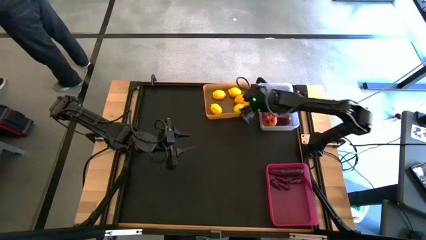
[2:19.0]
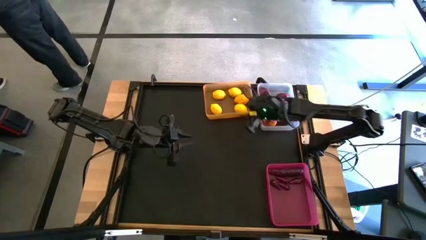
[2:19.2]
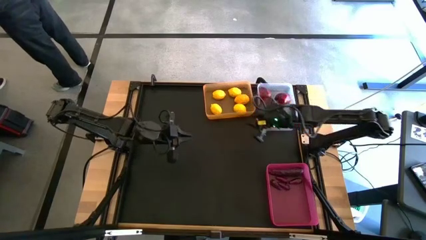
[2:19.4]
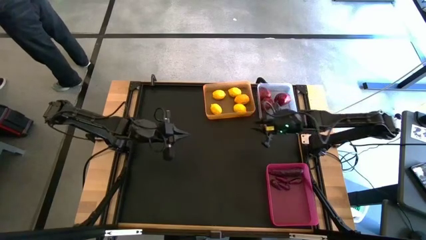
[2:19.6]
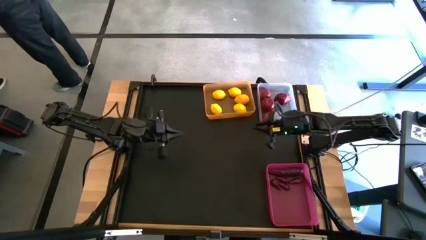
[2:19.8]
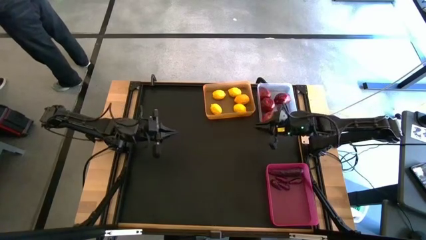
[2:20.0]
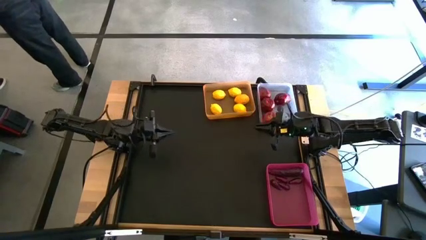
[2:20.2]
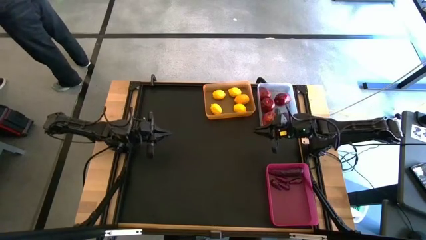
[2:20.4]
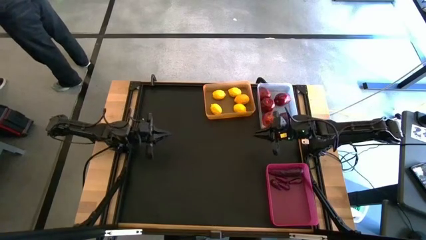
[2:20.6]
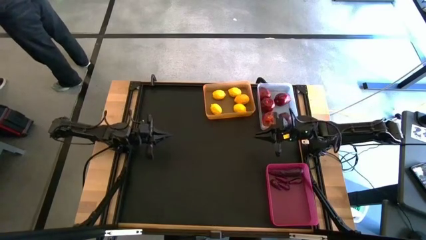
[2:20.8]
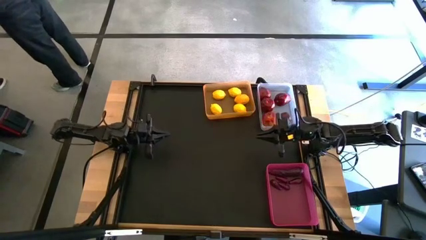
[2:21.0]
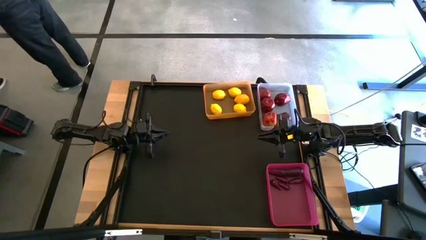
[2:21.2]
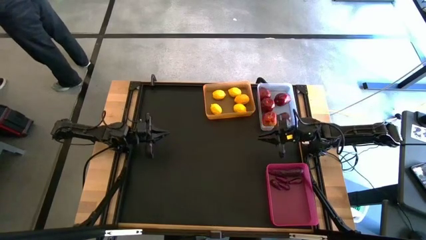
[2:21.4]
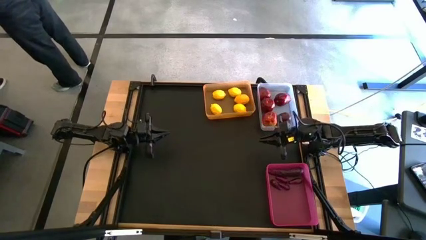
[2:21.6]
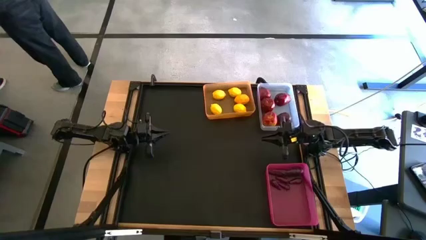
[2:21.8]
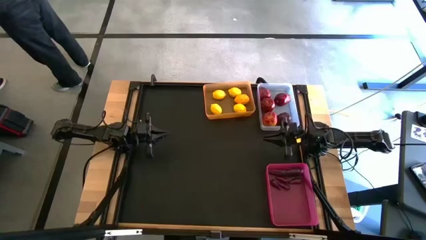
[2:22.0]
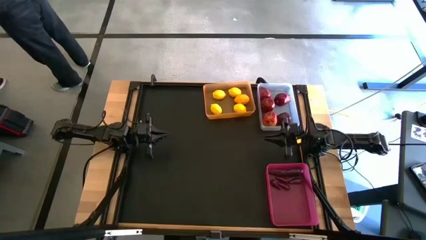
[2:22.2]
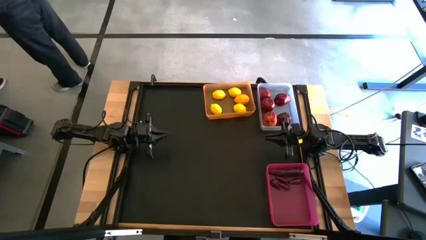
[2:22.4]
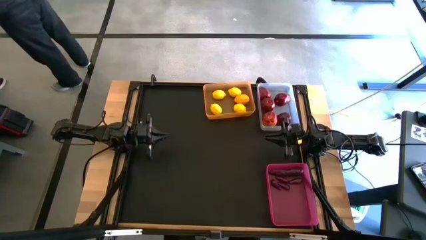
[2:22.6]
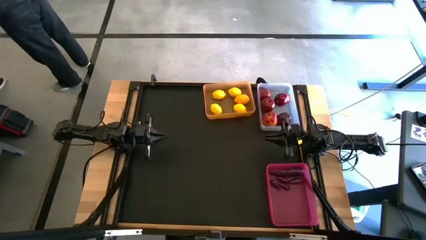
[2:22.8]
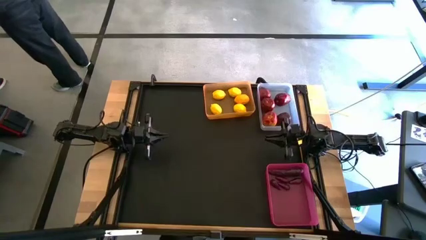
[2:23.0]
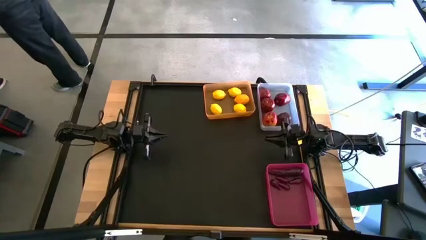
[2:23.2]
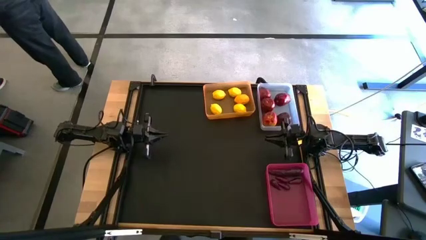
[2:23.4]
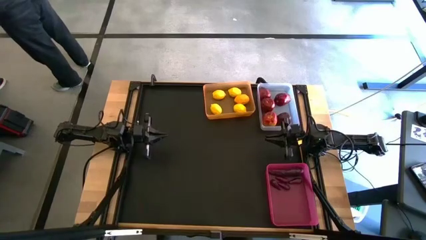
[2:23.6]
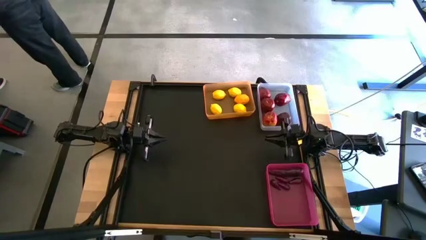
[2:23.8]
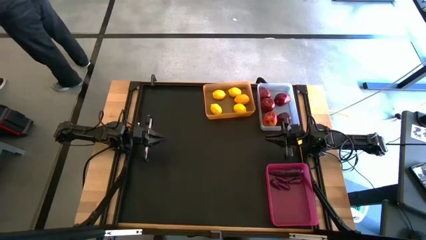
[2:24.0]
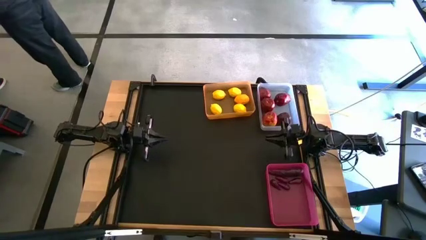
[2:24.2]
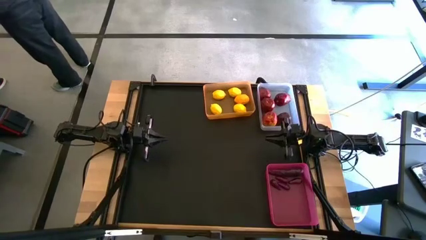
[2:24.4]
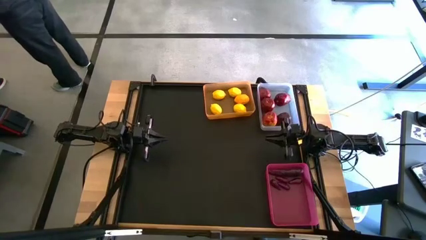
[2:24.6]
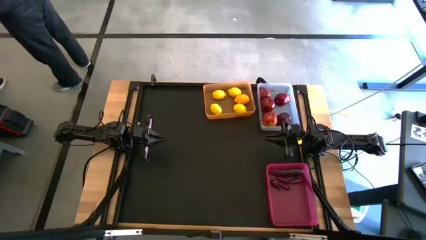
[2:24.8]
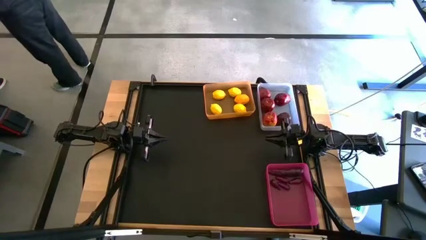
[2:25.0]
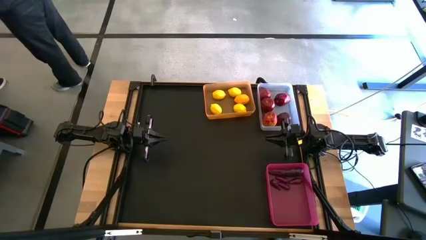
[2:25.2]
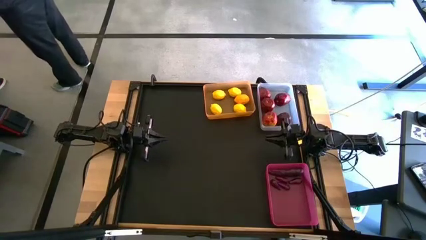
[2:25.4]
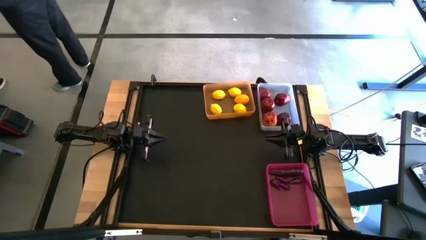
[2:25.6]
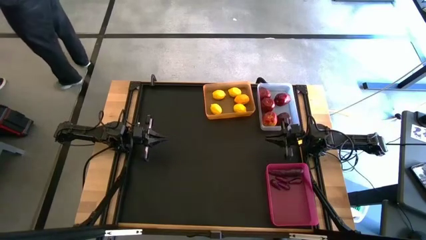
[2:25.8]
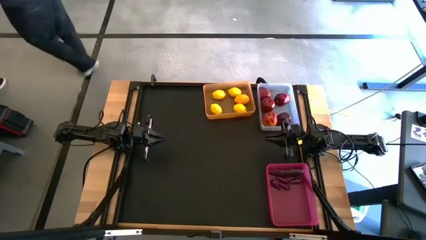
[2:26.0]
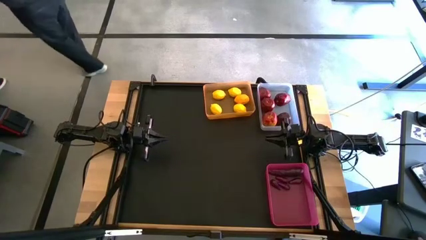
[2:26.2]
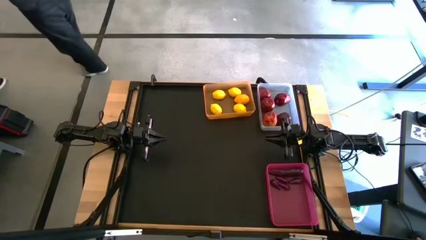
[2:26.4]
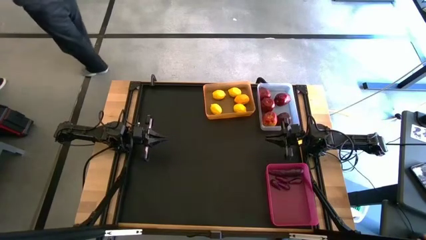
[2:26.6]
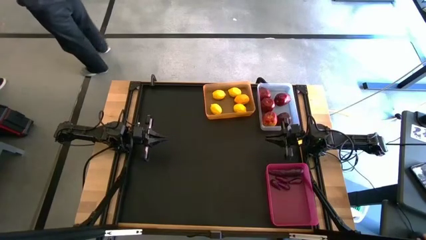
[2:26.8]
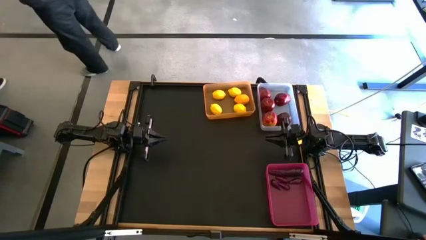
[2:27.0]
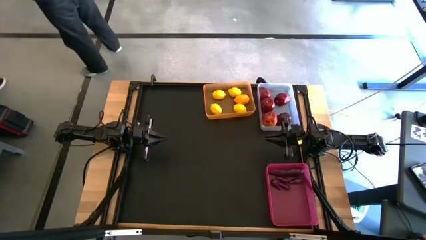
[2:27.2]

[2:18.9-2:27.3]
Task: Sort produce into baskets
Return to Home Position

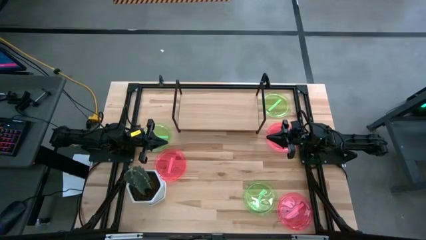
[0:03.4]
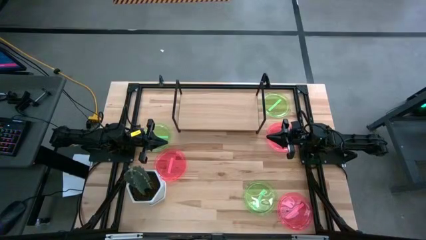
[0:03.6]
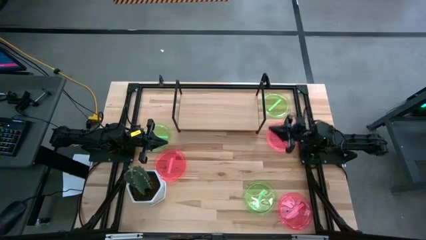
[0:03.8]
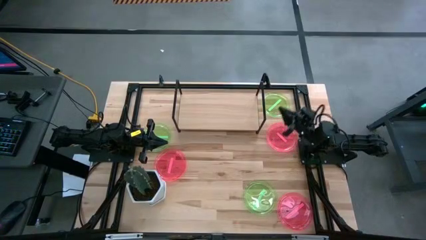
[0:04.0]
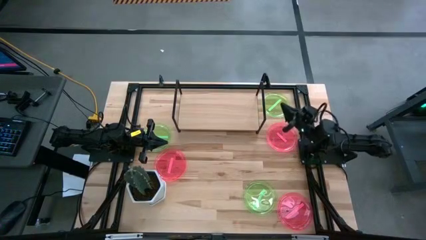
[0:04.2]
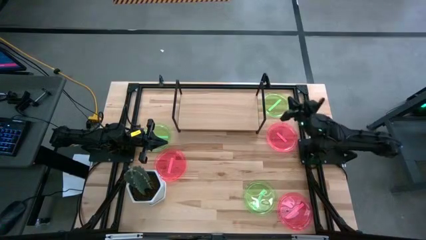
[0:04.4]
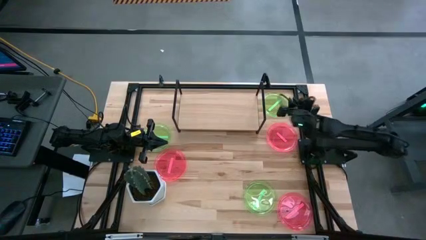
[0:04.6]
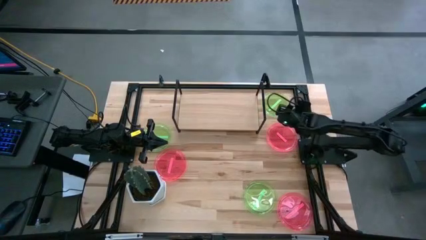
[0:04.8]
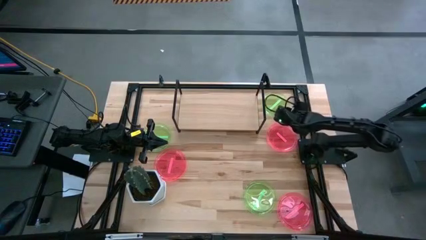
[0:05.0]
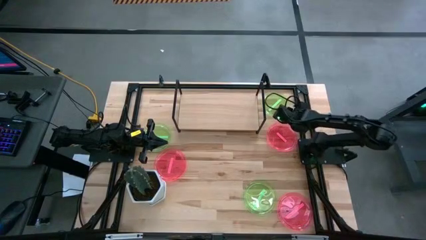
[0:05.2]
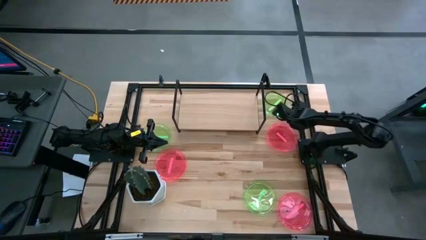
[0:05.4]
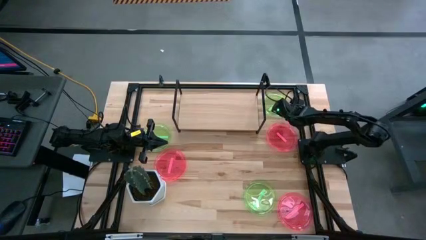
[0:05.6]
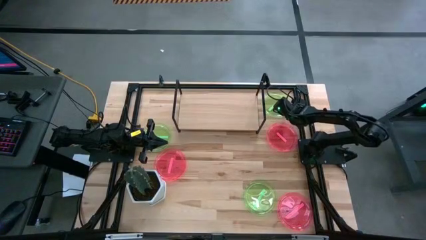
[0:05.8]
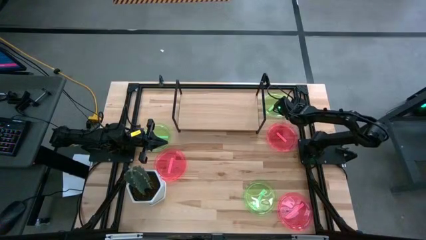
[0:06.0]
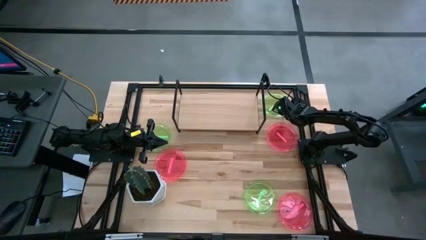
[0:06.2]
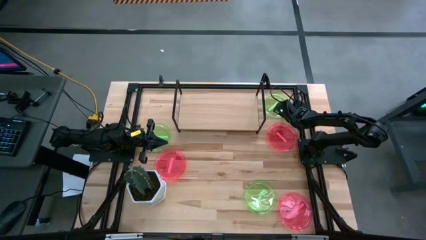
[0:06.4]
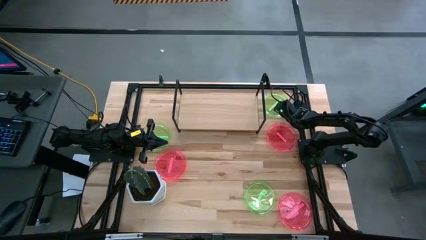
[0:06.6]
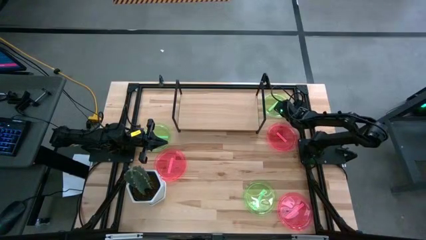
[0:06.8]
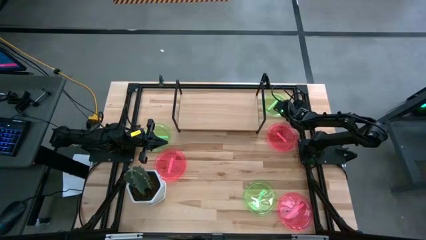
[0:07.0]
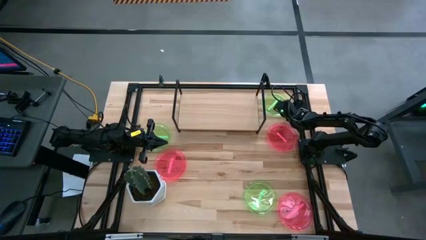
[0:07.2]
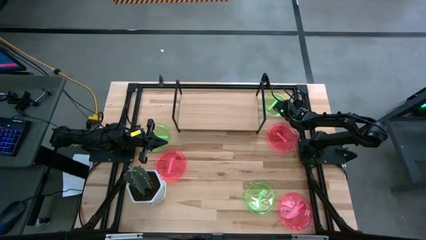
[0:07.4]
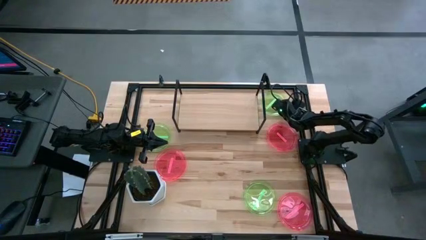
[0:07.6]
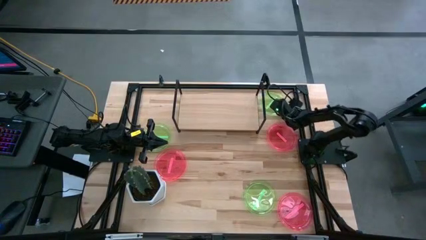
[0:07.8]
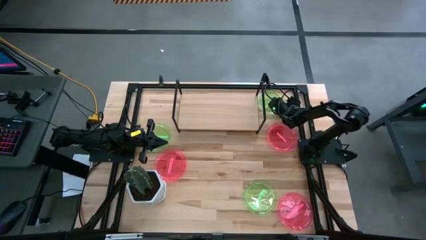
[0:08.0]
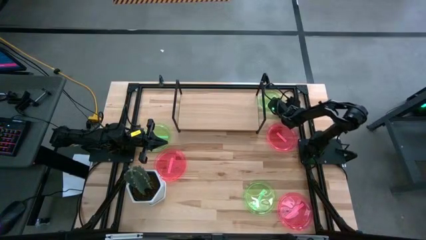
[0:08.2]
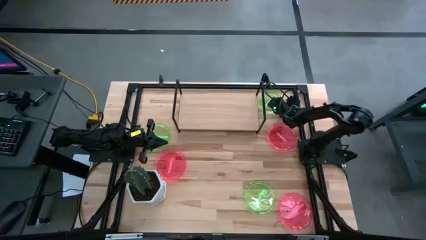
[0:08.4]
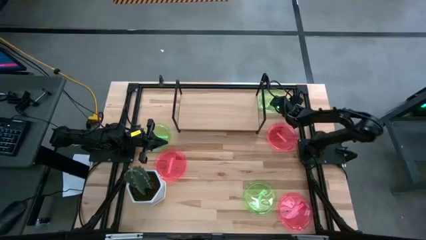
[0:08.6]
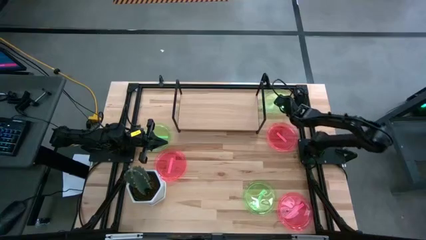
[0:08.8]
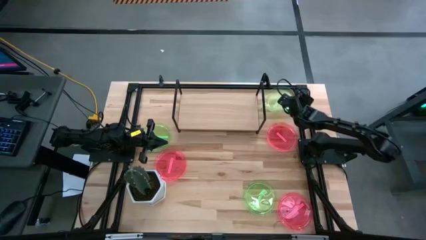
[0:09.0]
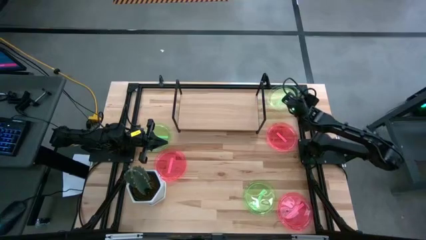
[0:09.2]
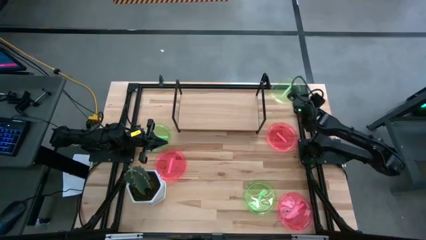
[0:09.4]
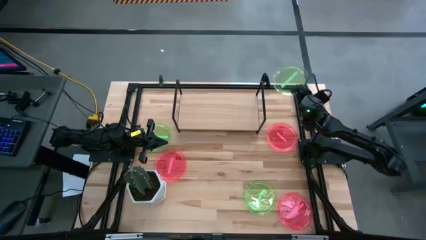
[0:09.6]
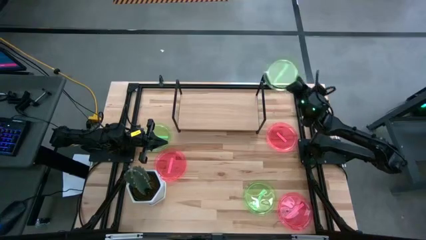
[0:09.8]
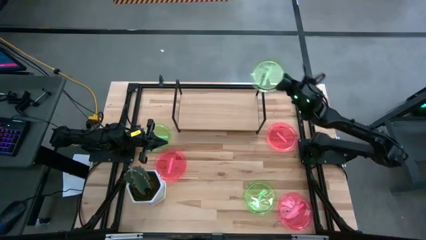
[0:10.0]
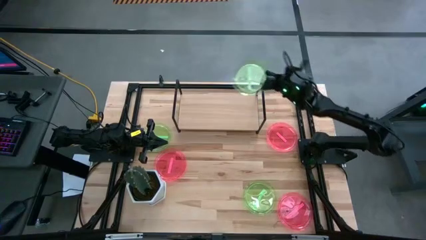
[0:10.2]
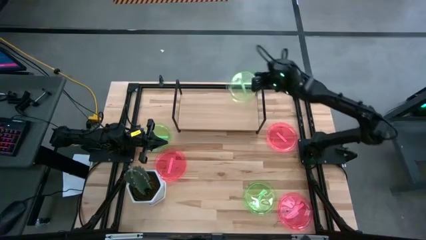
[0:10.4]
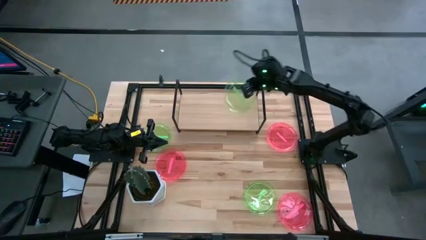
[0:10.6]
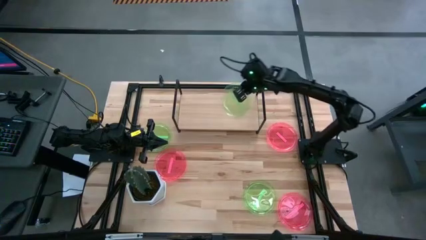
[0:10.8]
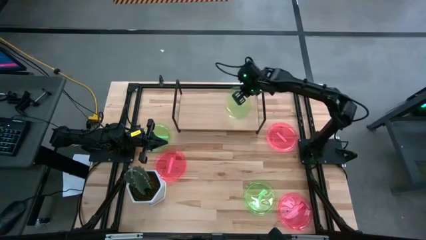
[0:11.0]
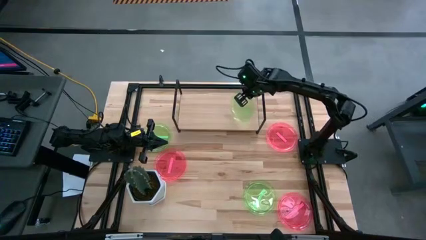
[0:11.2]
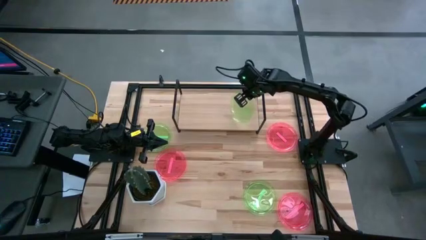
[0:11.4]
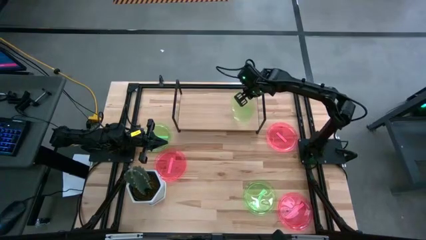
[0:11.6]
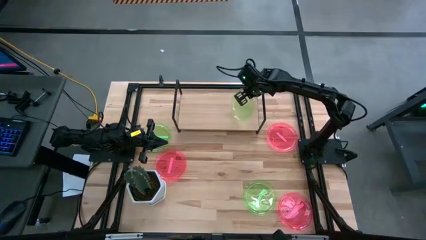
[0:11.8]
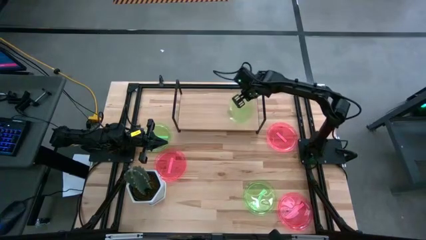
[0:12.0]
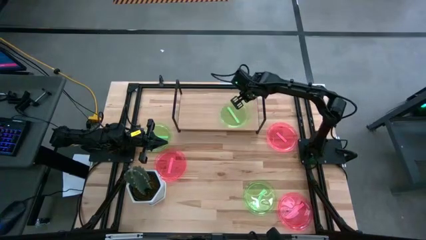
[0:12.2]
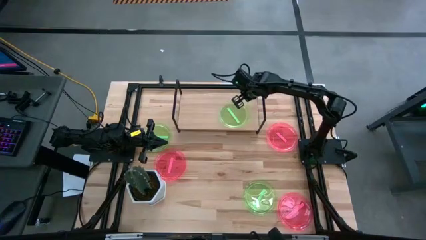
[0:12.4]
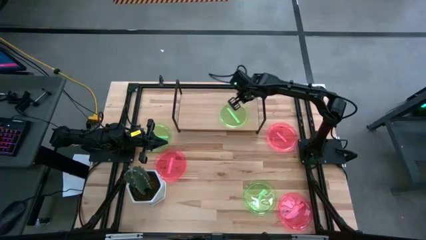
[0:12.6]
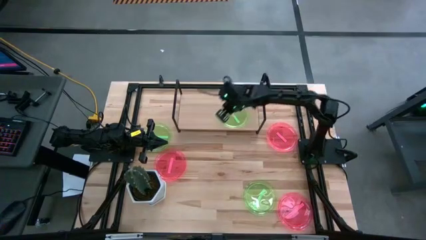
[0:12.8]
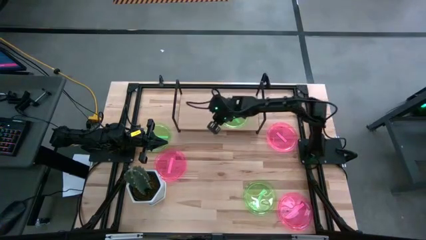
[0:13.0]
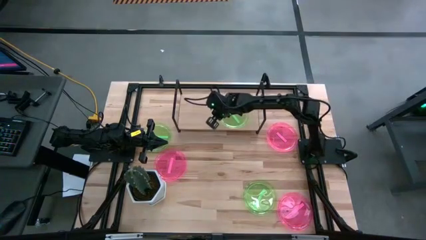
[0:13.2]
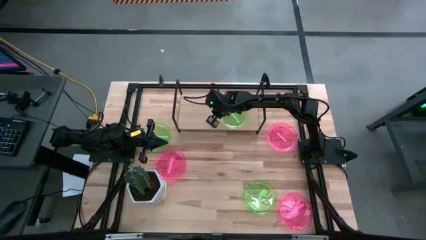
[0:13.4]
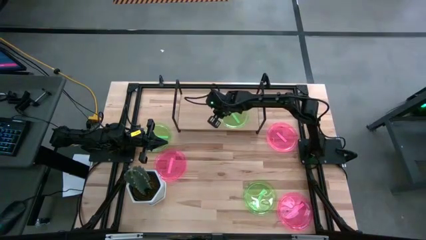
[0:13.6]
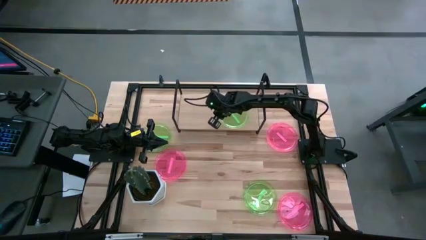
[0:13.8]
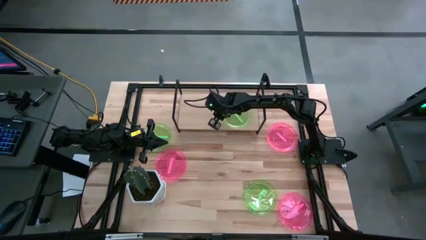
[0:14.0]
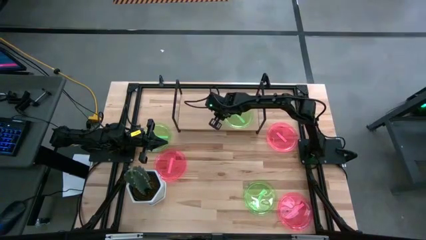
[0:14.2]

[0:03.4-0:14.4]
Task: Place and stack plates onto a shelf
Put the top right green plate on the shelf
